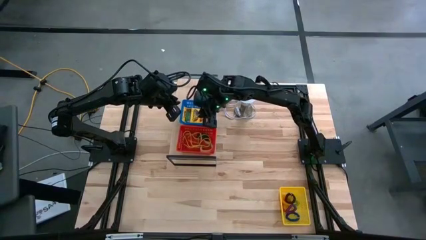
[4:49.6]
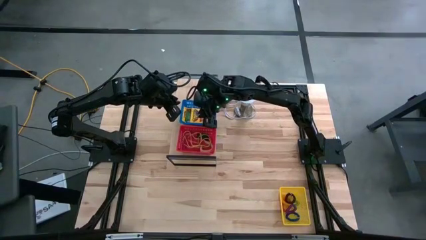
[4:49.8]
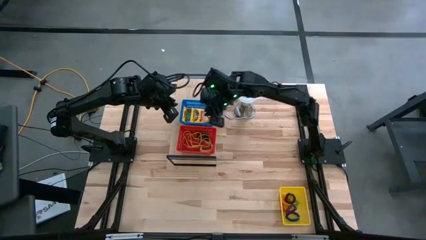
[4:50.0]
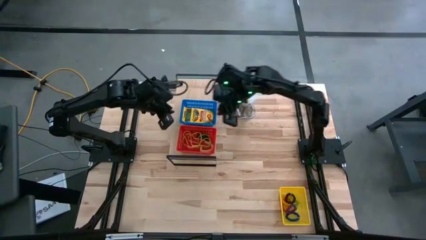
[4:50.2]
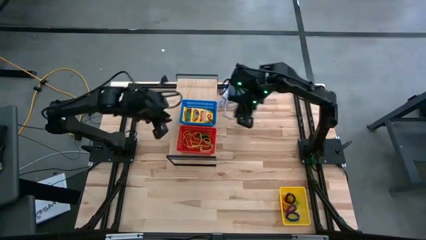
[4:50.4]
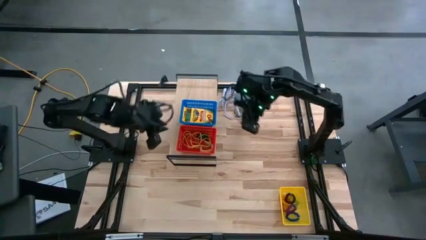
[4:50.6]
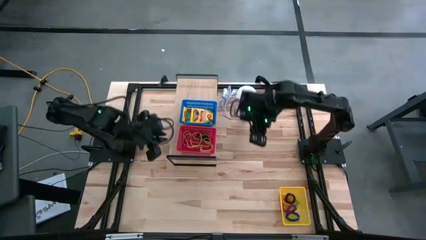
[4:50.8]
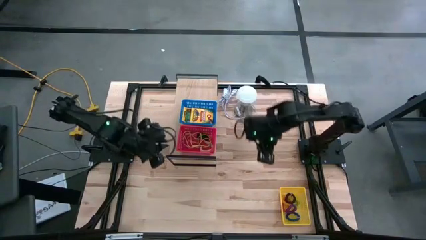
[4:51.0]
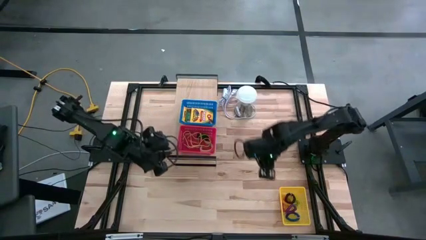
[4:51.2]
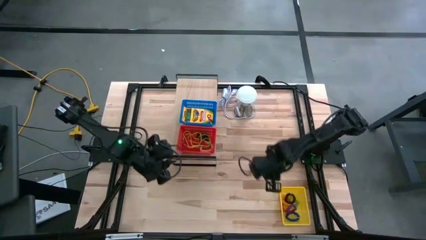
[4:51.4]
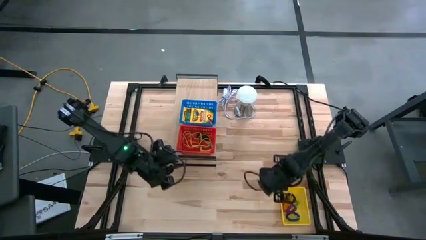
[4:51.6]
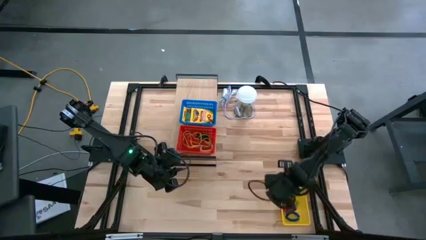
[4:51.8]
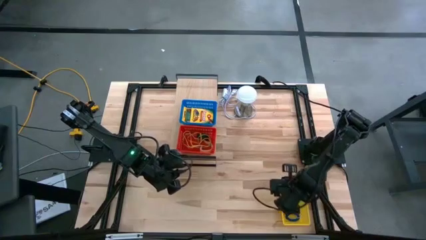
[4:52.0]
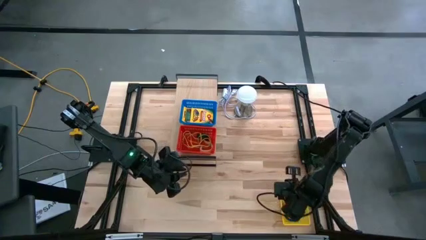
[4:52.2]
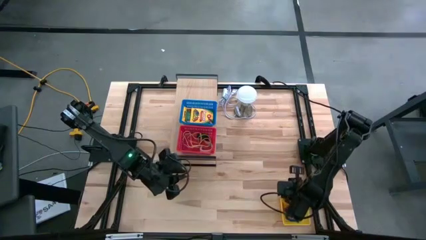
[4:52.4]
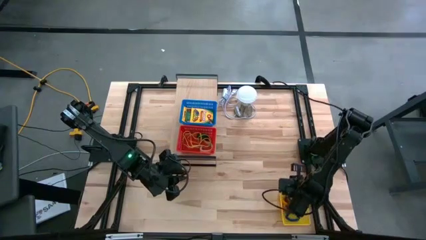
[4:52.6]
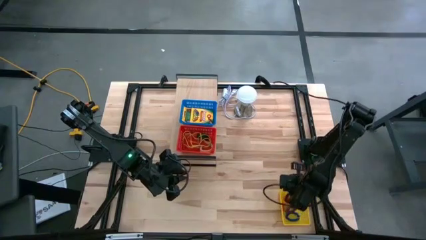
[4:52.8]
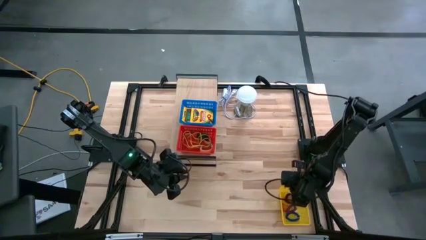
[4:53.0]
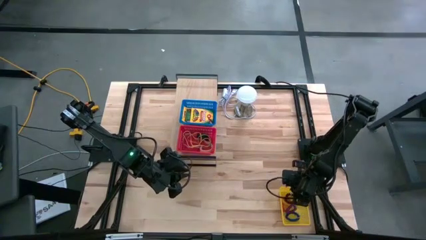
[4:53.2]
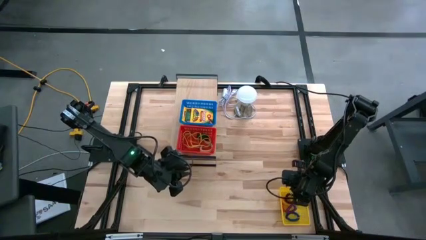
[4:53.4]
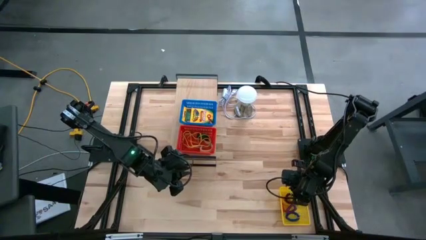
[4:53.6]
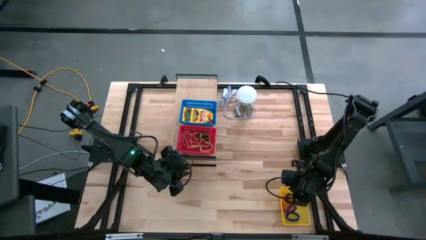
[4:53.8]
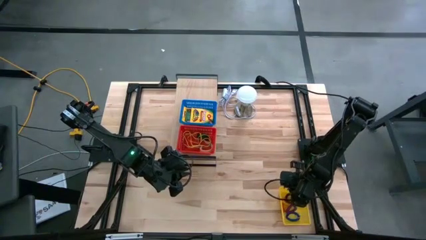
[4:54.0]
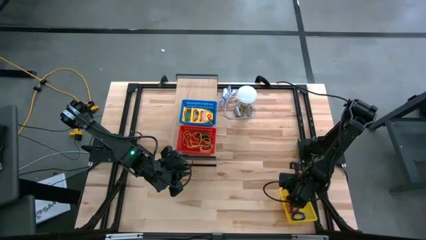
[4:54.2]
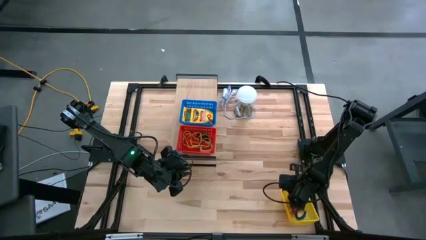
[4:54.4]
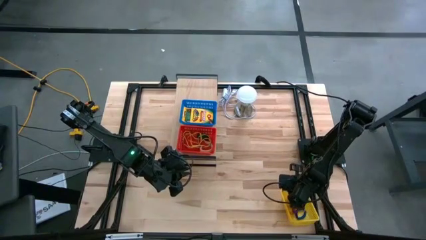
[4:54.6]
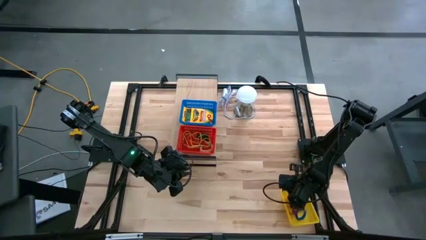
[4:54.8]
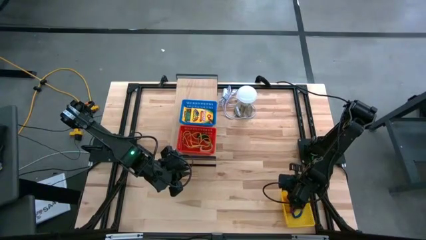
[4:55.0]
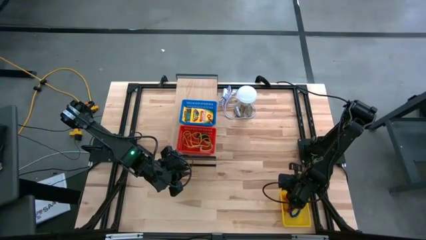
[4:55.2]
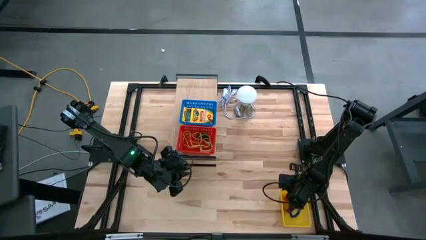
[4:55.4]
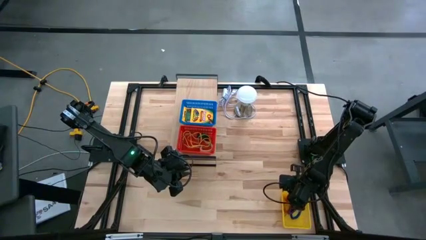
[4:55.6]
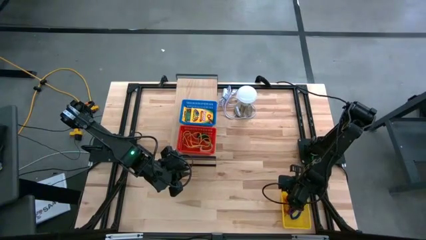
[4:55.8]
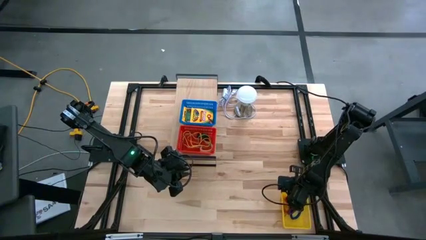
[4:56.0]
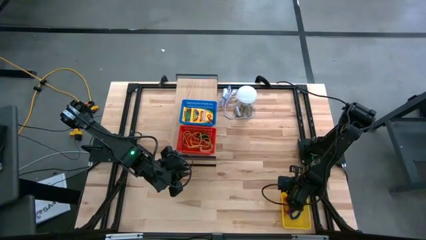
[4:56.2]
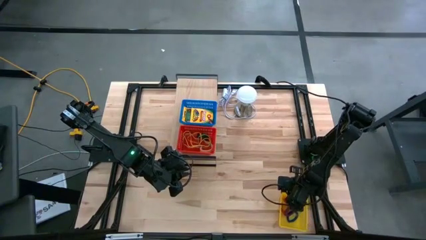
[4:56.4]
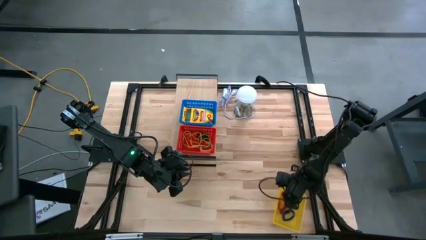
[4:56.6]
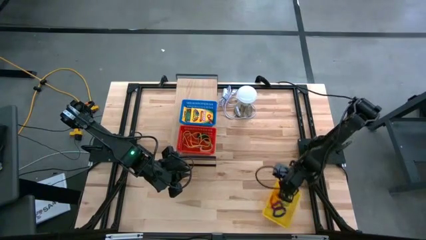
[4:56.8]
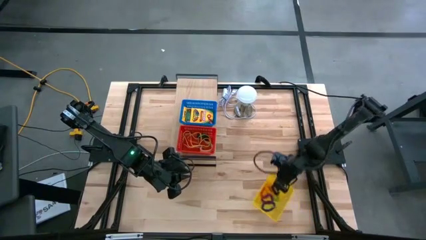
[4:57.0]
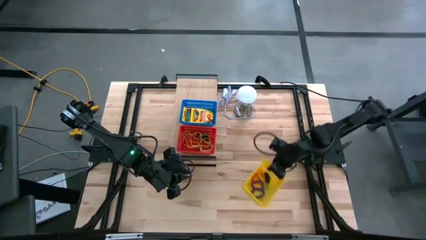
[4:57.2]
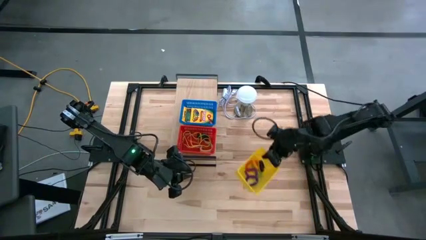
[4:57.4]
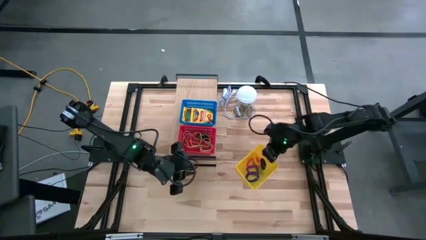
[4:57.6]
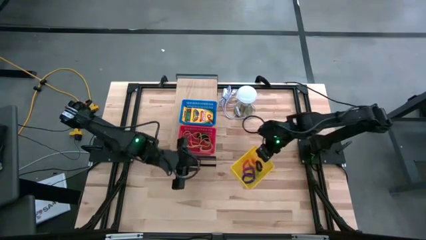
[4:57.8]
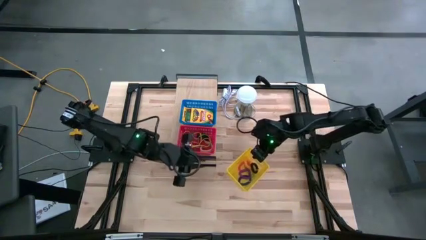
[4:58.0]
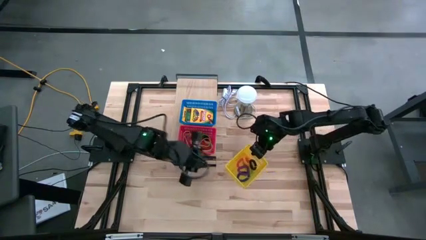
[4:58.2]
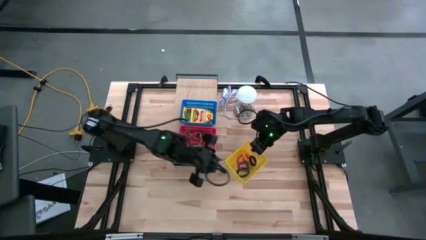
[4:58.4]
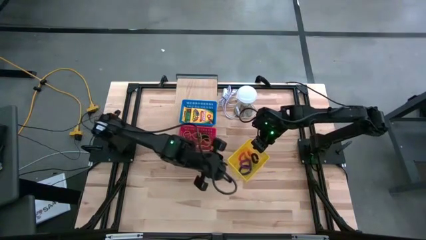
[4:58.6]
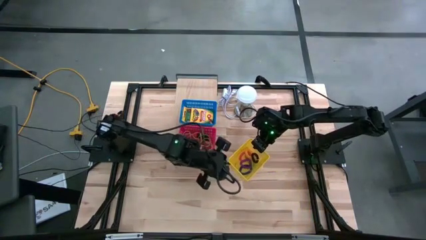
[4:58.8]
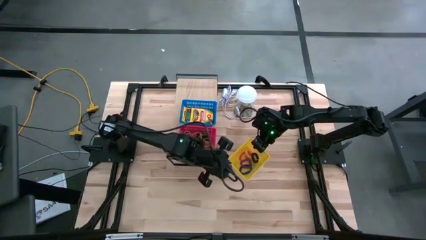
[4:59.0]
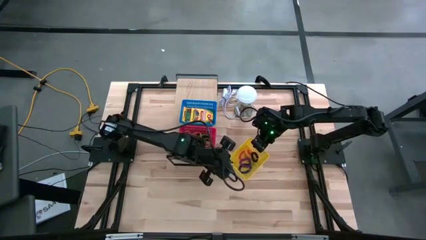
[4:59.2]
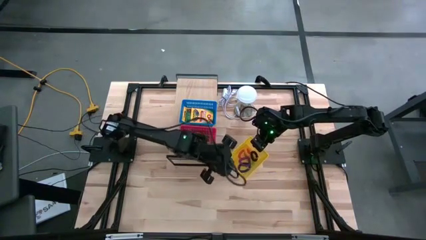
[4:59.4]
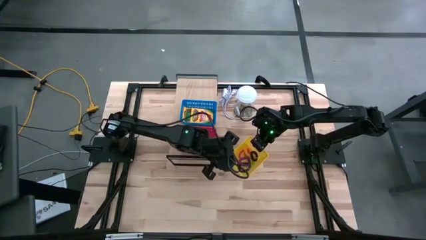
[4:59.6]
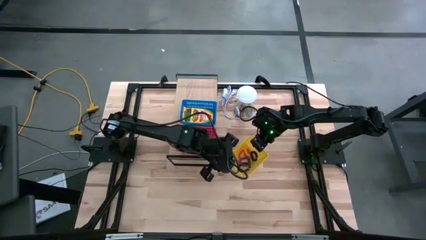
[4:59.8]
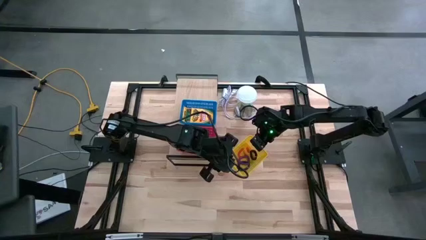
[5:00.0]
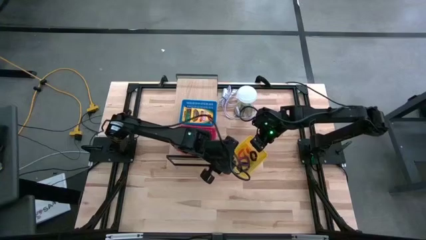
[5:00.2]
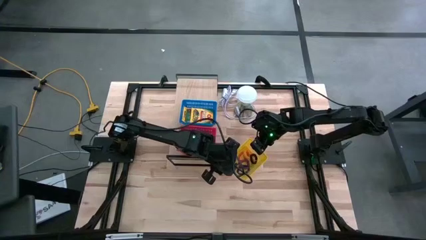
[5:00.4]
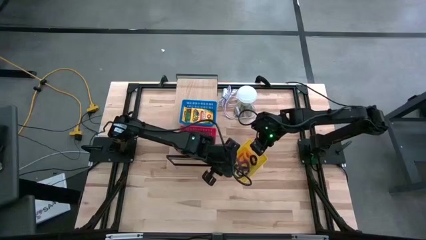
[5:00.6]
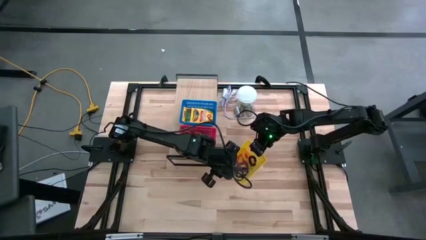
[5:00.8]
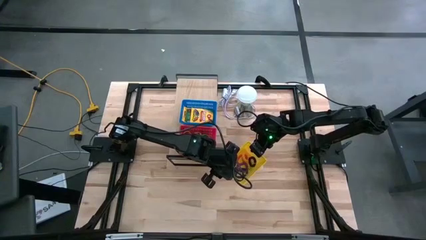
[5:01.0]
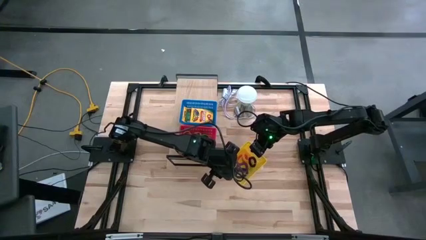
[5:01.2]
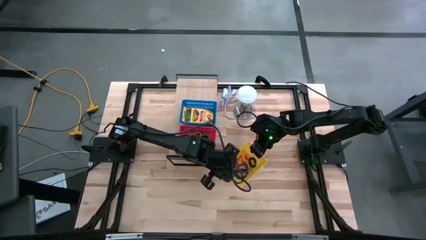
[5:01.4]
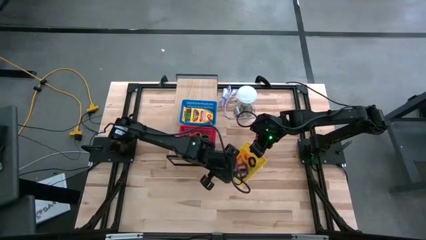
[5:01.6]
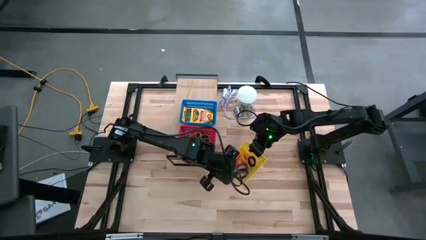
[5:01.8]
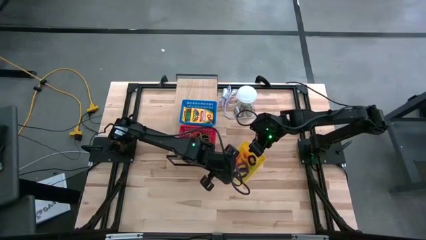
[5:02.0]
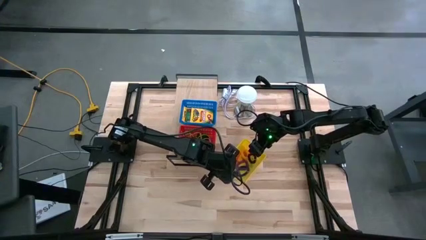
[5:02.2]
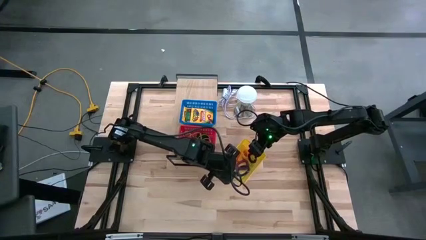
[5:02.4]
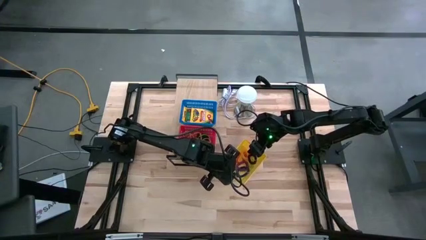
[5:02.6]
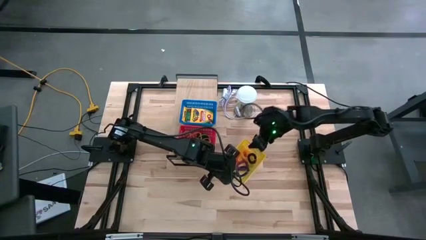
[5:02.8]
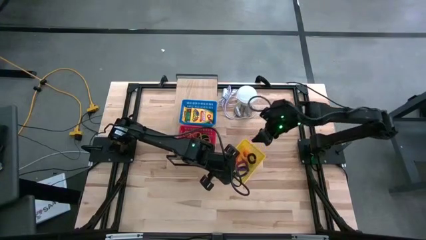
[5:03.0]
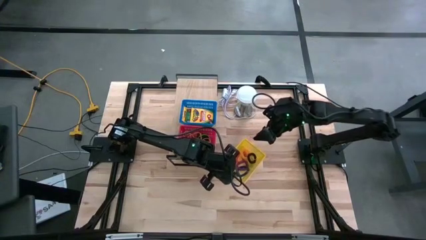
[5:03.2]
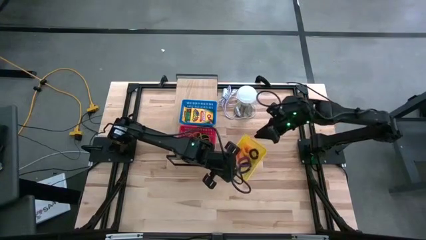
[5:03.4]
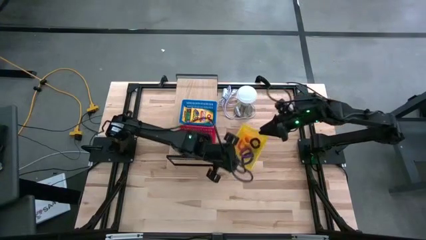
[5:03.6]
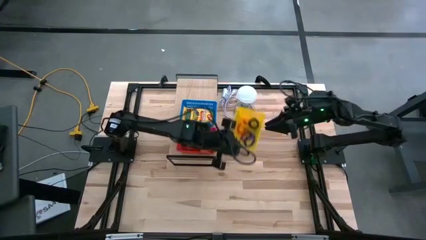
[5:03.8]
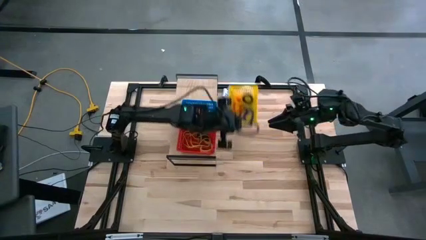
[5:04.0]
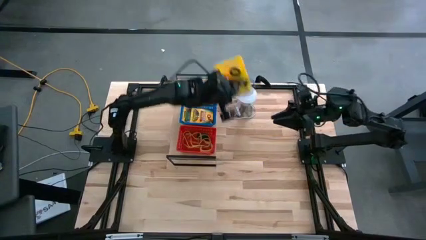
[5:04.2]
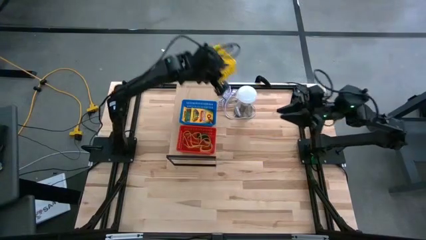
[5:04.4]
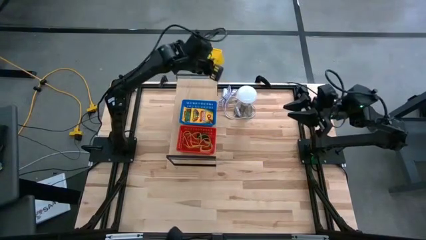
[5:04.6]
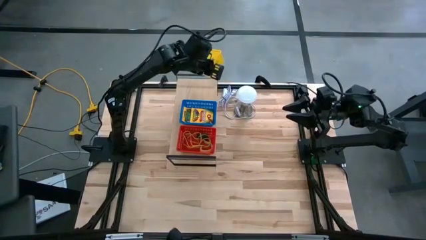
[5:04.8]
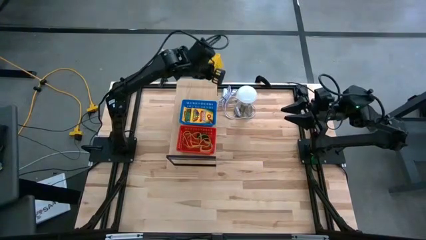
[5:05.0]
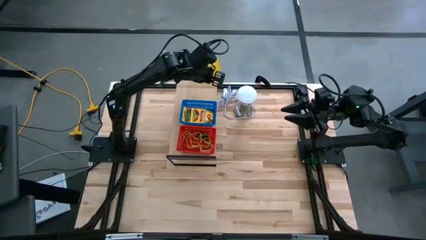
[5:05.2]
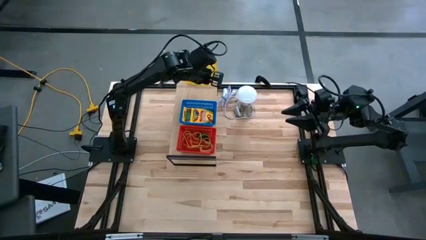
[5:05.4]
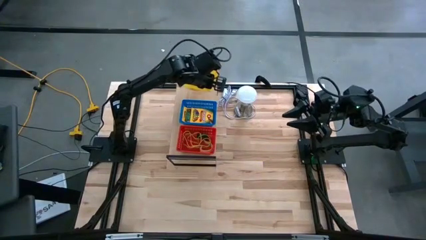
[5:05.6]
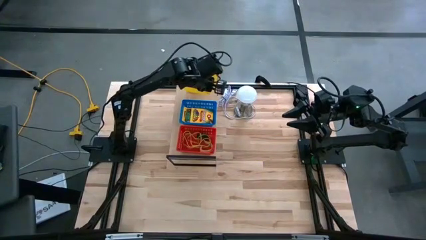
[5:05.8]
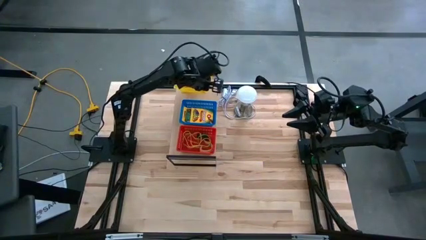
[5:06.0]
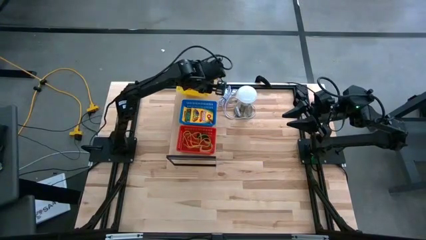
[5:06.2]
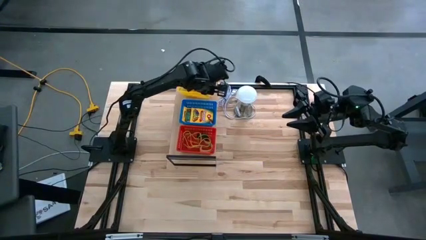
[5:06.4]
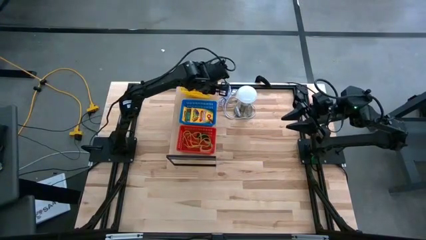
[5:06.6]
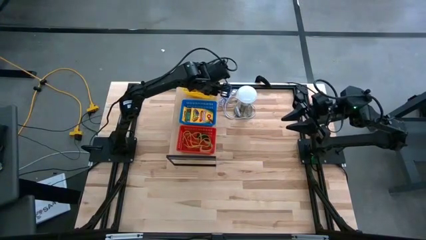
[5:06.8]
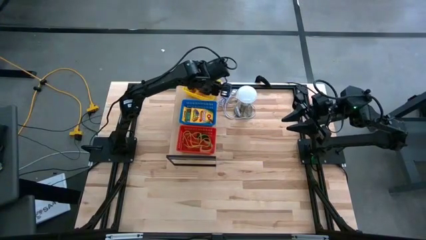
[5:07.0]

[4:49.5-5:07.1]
Task: Pick & Place Office Desk Supplies
Put the yellow bin on the shelf
